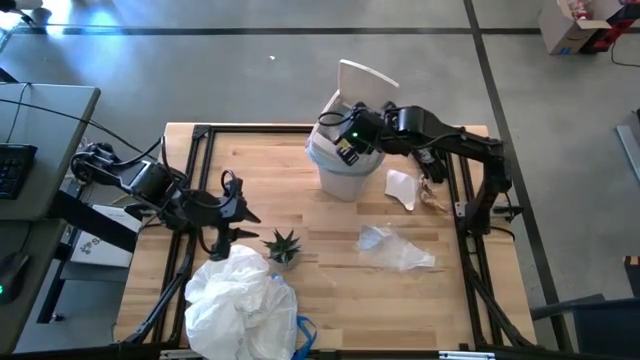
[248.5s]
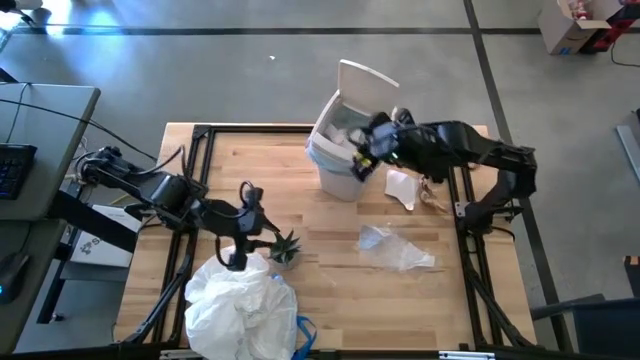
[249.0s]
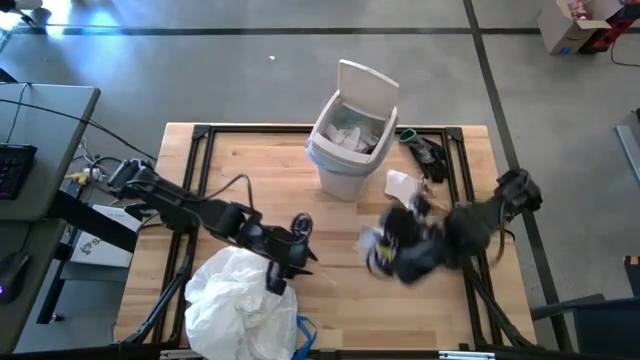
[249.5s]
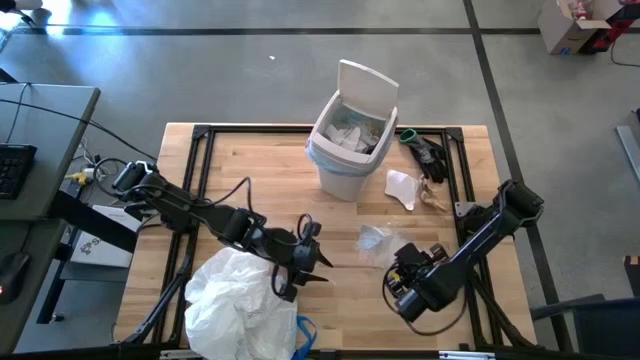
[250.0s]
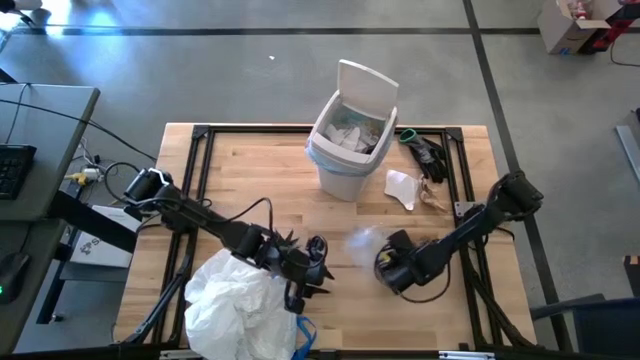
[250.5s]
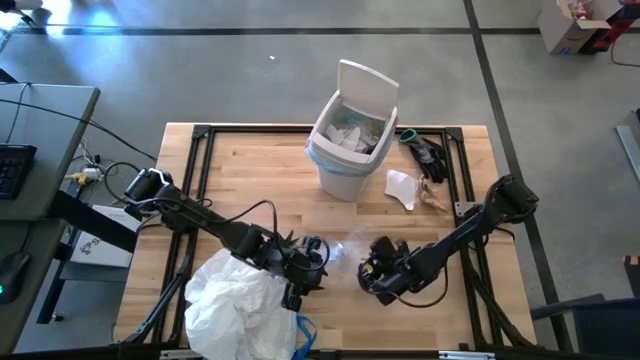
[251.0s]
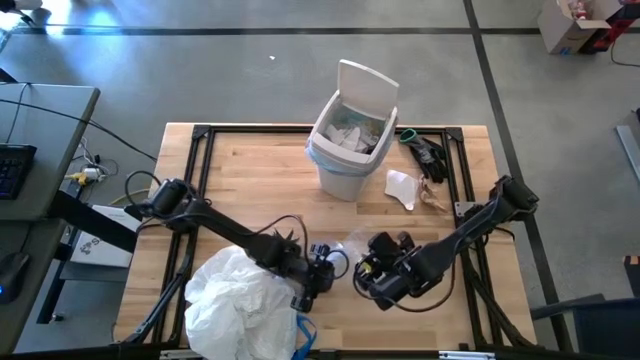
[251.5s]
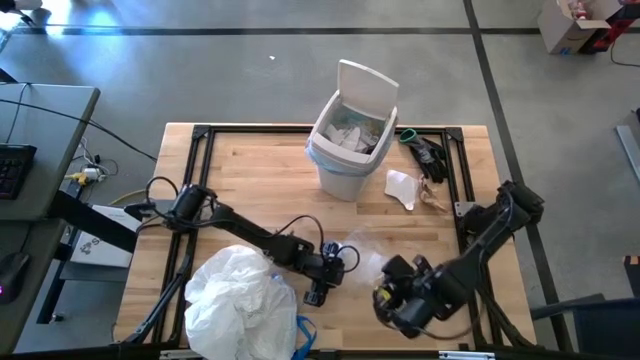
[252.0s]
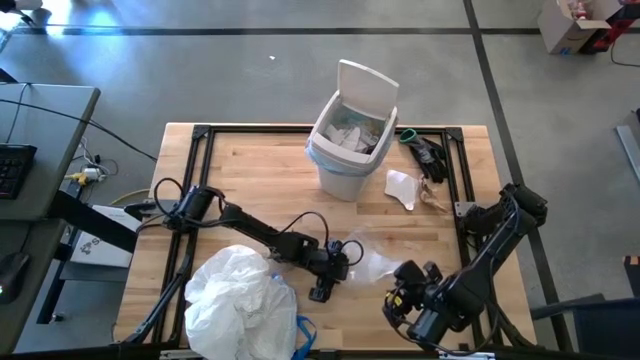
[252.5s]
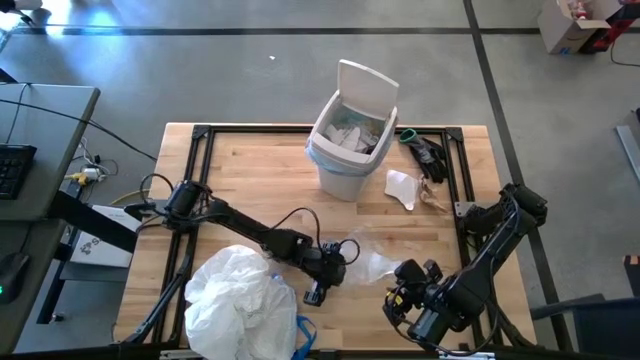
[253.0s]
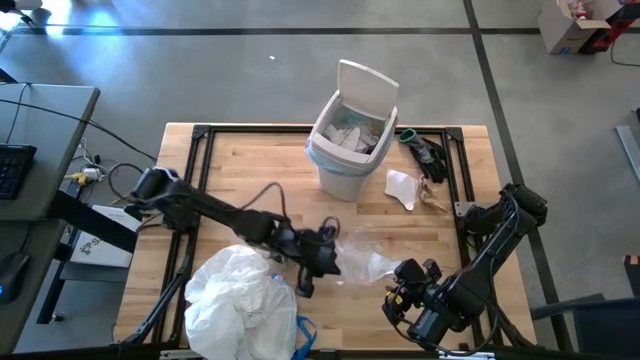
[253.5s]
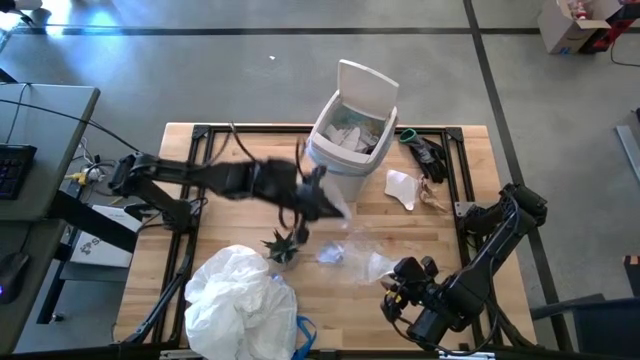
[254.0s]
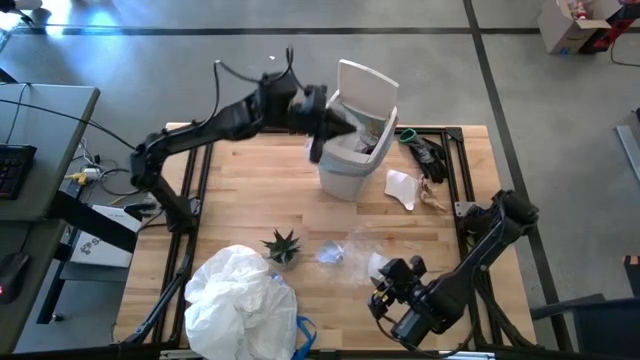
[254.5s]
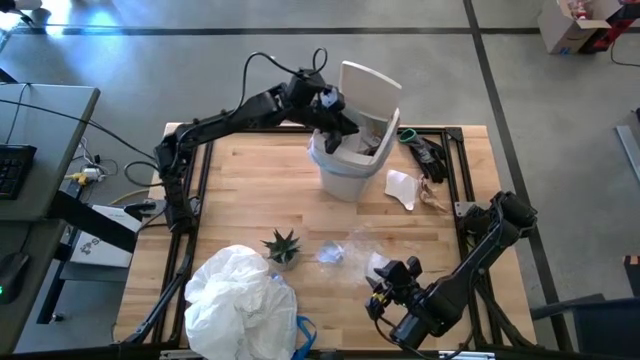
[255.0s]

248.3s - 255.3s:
Task: place trash/remove bag and relplace
Put the transparent plastic into the trash bin

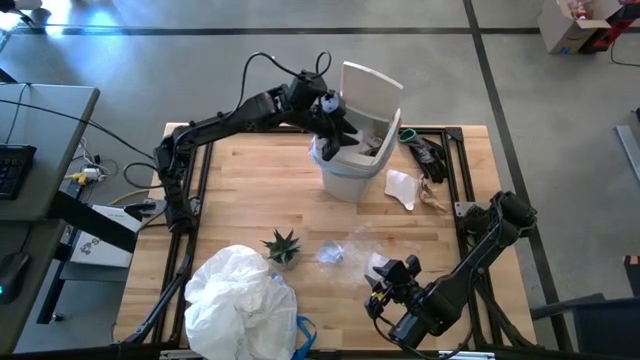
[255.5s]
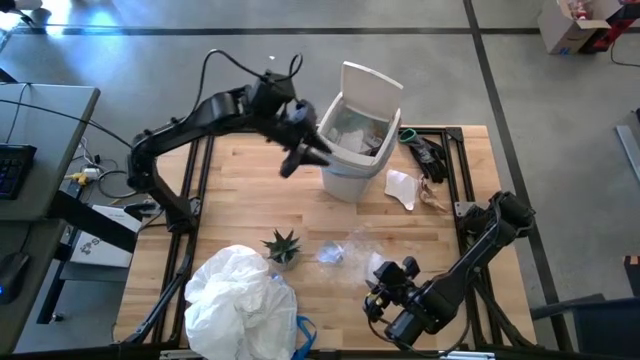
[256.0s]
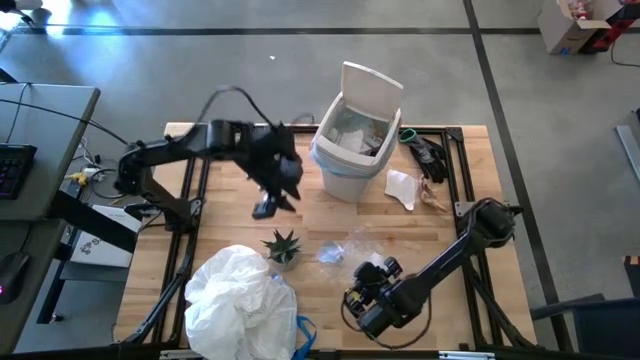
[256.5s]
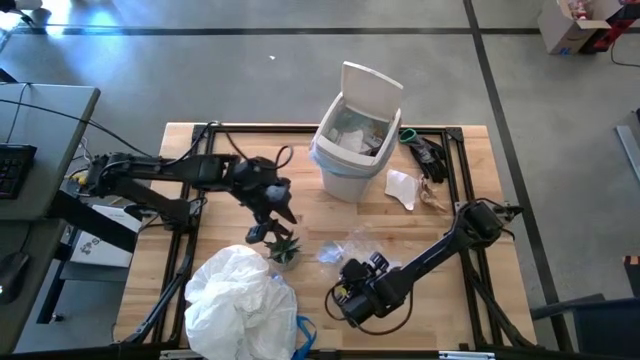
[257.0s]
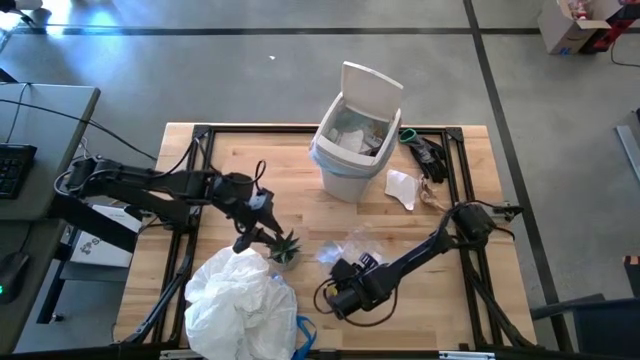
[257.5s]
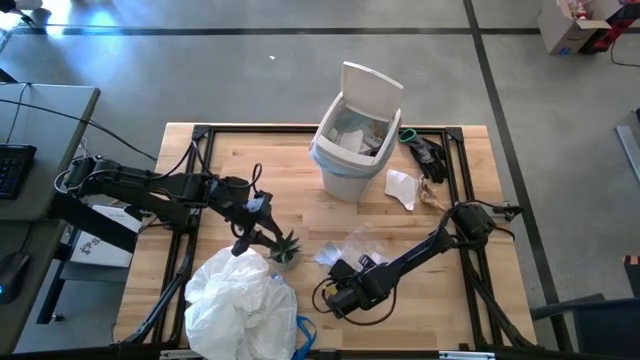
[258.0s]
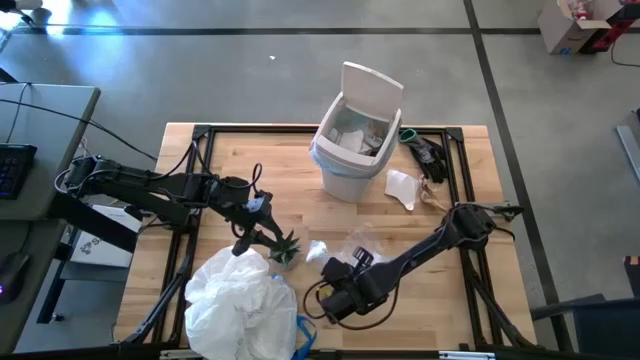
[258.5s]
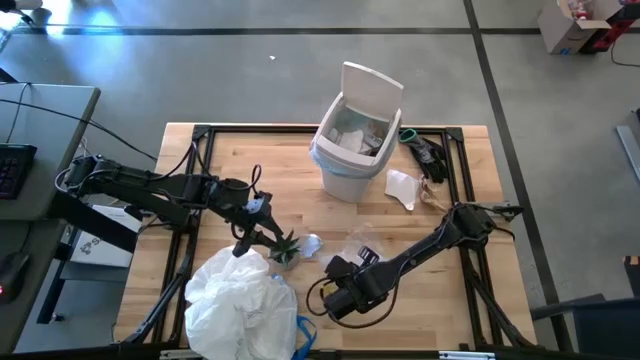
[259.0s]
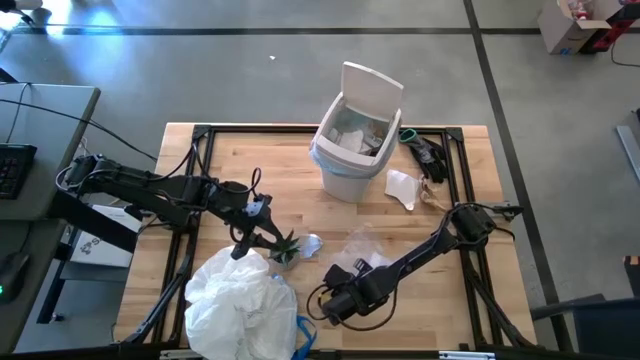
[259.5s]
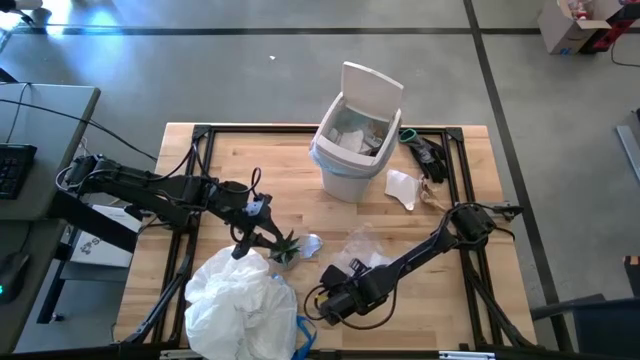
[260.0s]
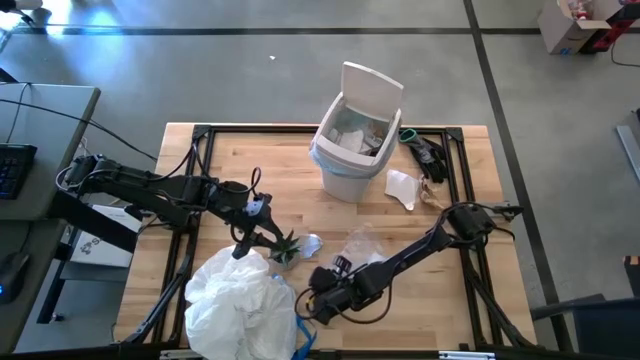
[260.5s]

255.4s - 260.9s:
Put the transparent plastic into the trash bin

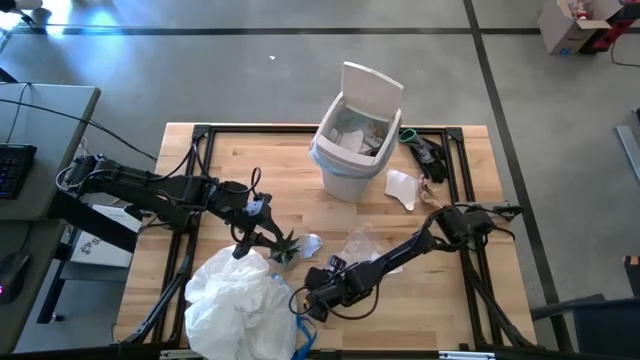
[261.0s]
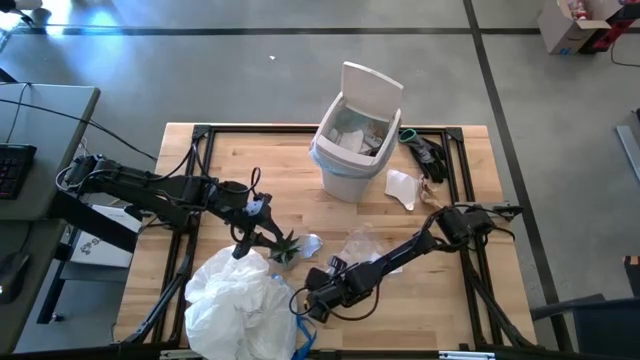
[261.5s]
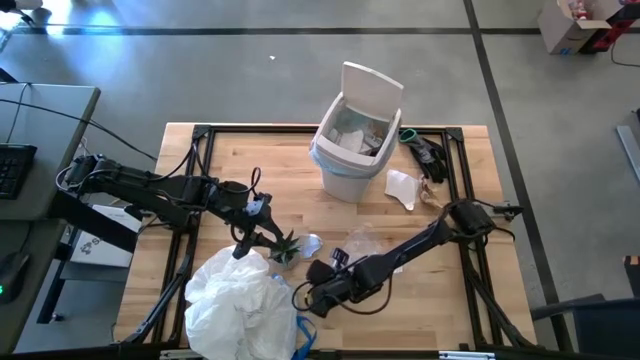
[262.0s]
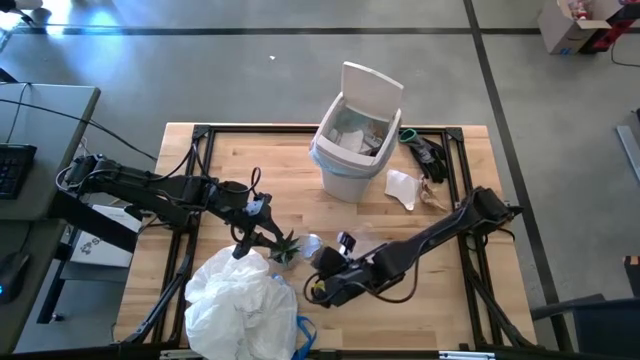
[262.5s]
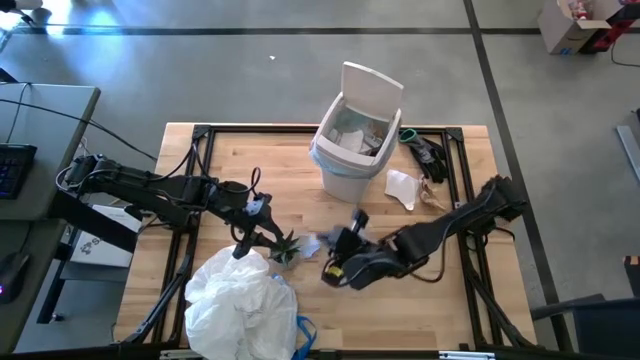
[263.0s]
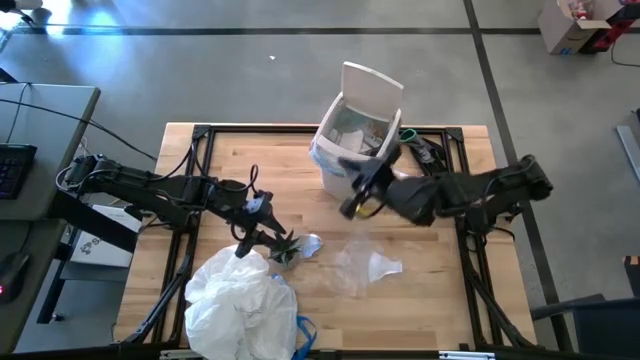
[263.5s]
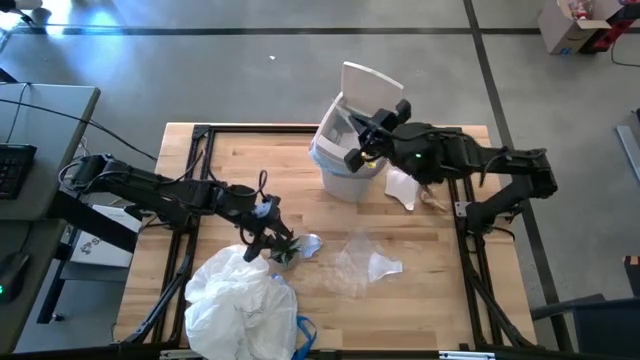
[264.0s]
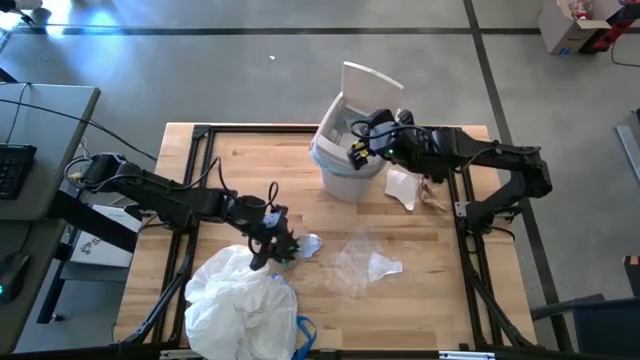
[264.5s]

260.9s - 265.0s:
Put the transparent plastic into the trash bin

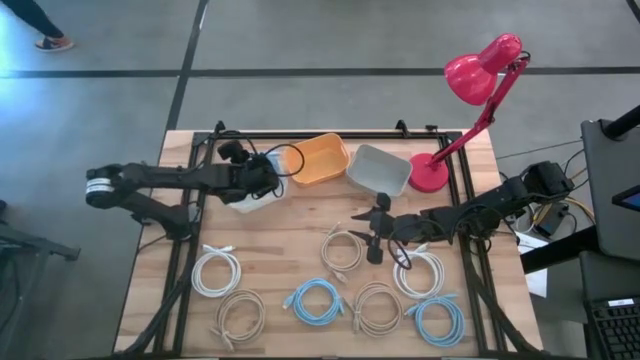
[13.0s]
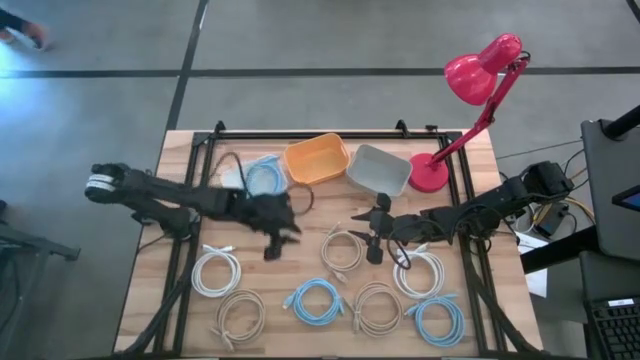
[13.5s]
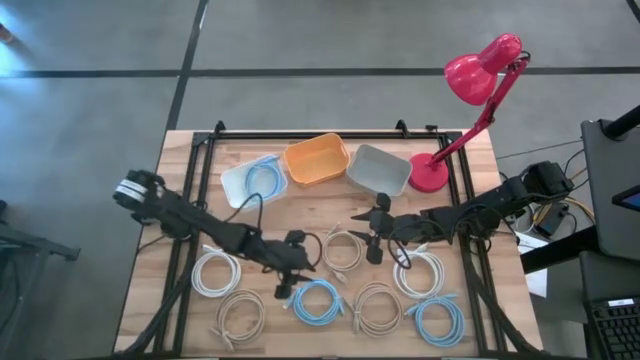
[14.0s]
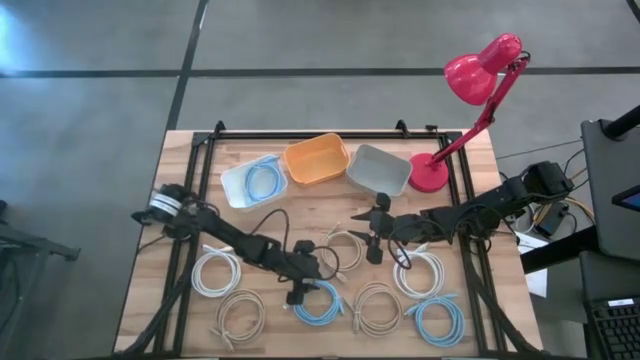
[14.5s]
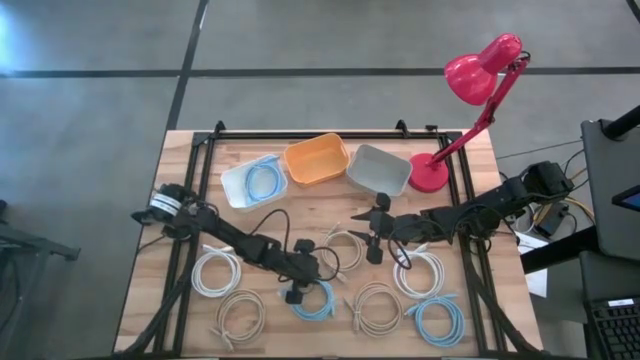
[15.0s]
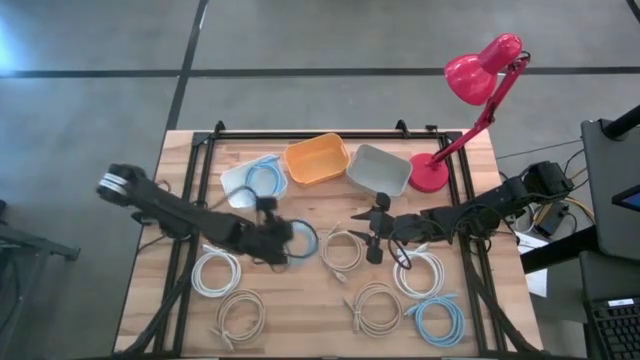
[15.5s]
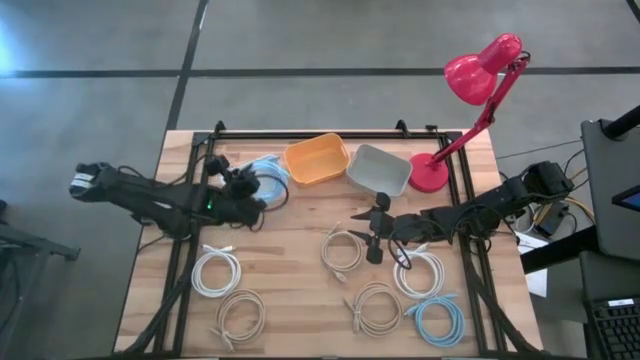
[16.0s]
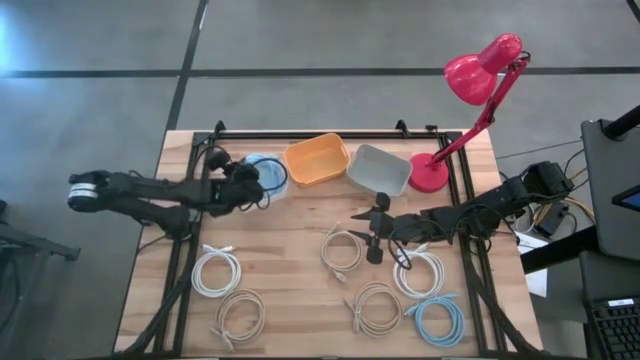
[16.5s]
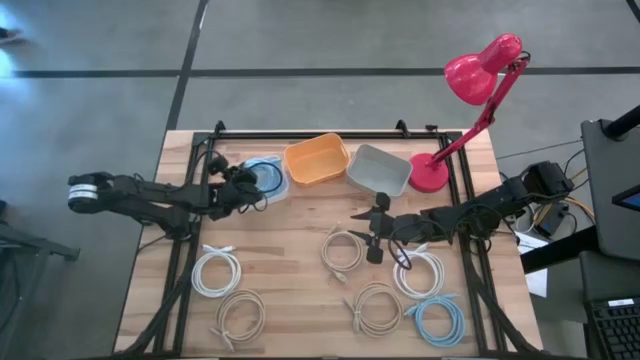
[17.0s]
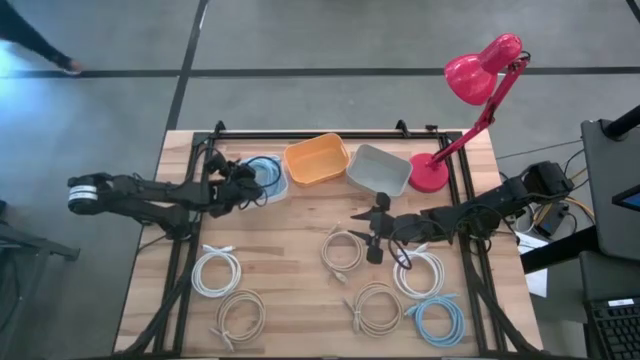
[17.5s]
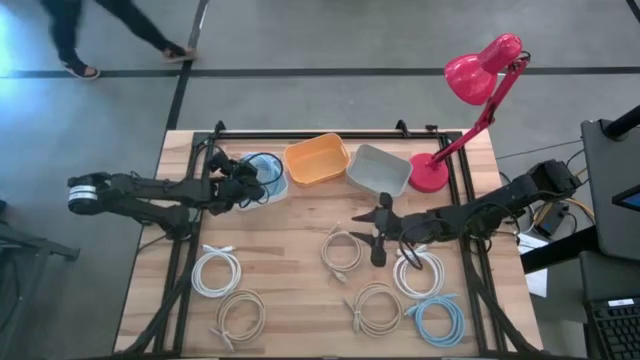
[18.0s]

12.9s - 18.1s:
Task: Pick & Place USB Port
Put the left blue charger cable into the white bin
